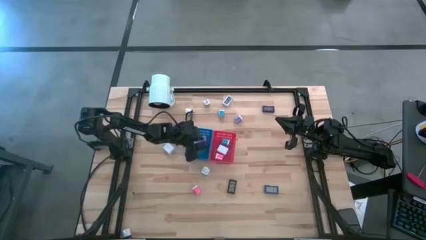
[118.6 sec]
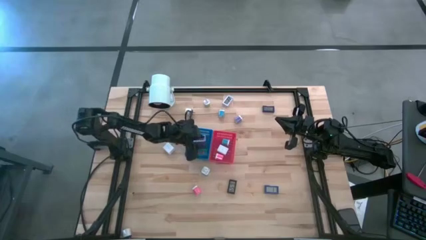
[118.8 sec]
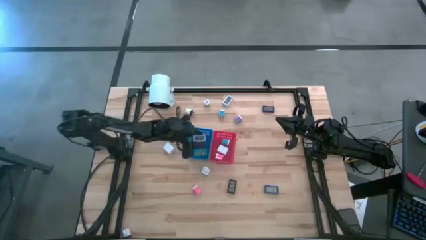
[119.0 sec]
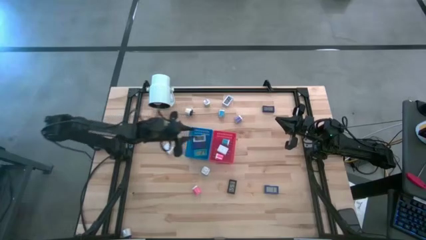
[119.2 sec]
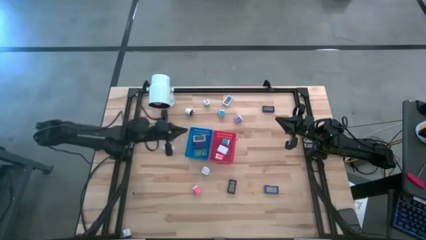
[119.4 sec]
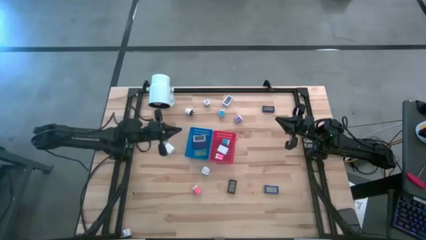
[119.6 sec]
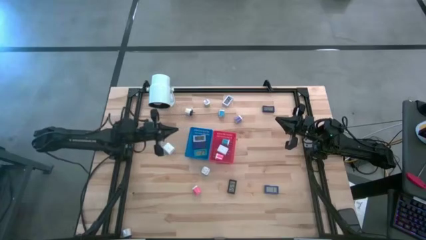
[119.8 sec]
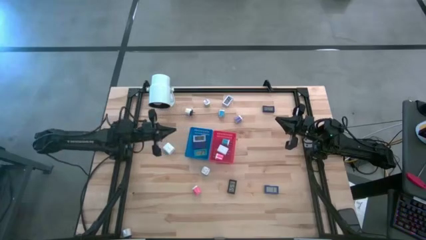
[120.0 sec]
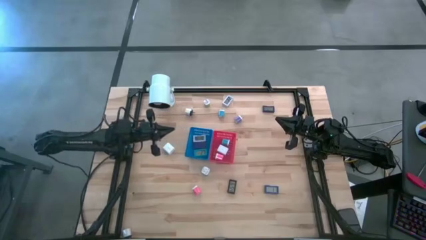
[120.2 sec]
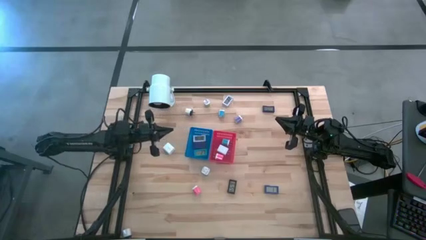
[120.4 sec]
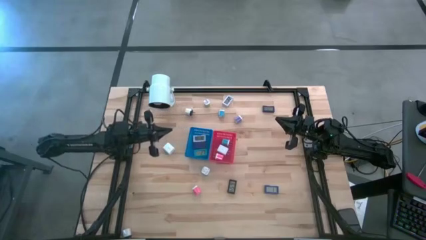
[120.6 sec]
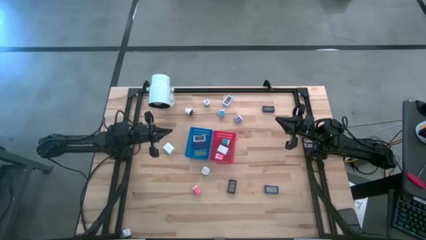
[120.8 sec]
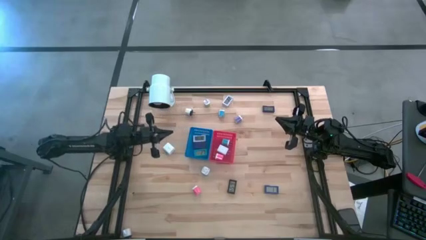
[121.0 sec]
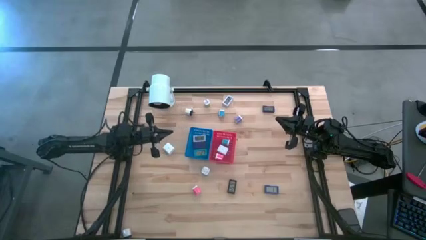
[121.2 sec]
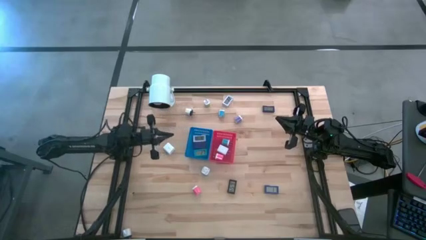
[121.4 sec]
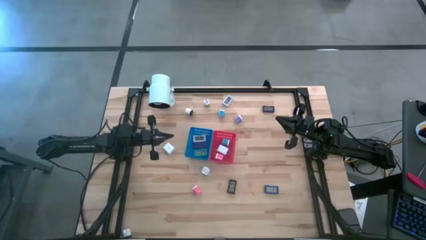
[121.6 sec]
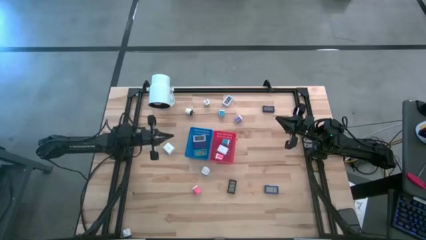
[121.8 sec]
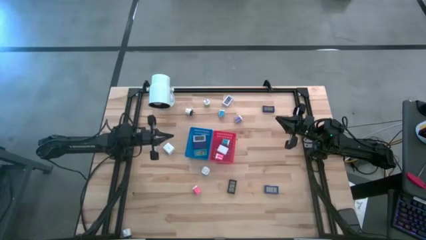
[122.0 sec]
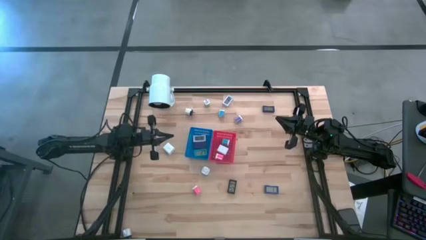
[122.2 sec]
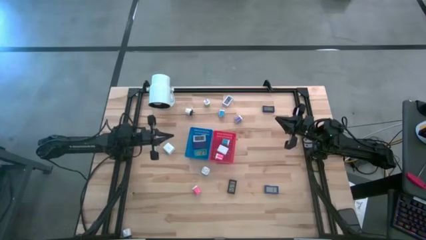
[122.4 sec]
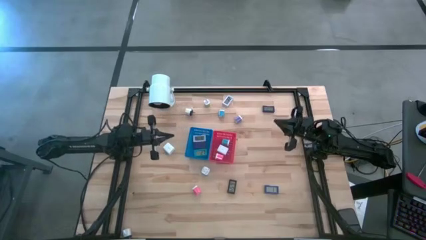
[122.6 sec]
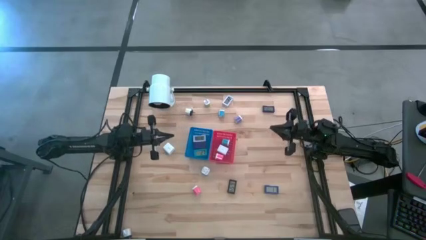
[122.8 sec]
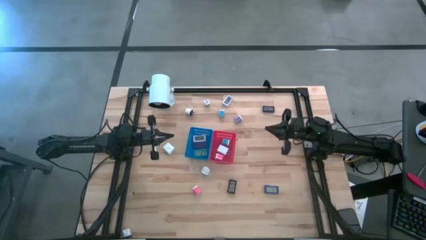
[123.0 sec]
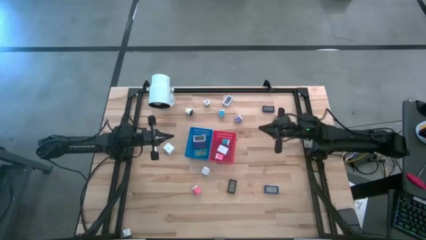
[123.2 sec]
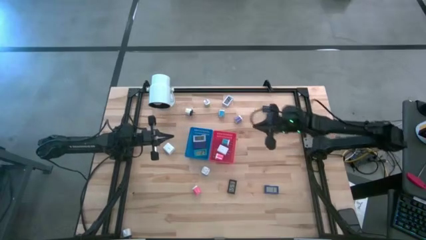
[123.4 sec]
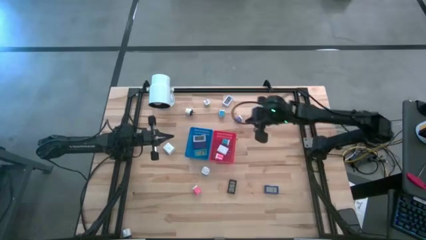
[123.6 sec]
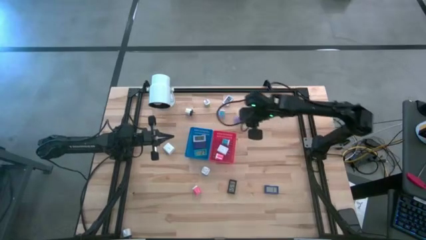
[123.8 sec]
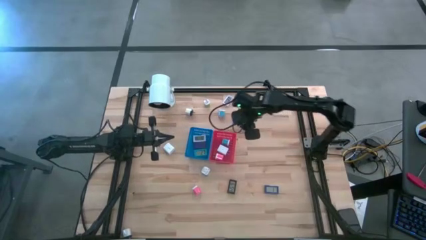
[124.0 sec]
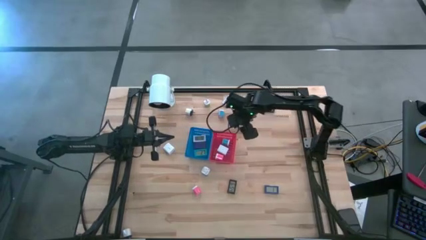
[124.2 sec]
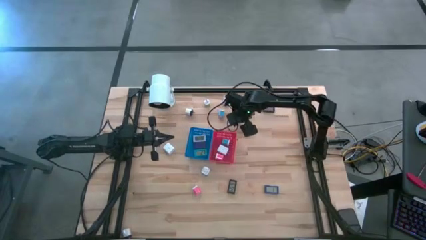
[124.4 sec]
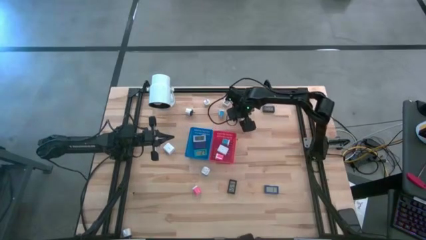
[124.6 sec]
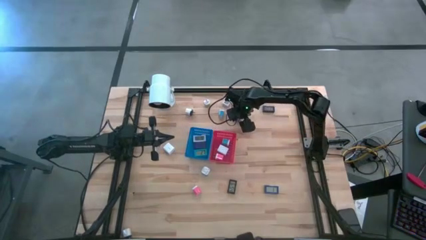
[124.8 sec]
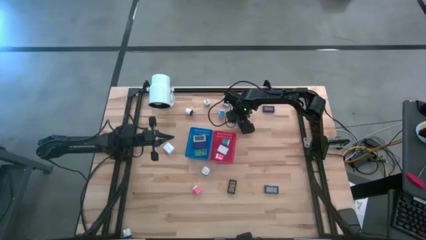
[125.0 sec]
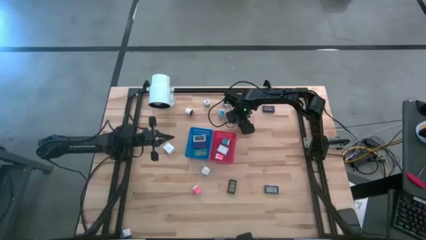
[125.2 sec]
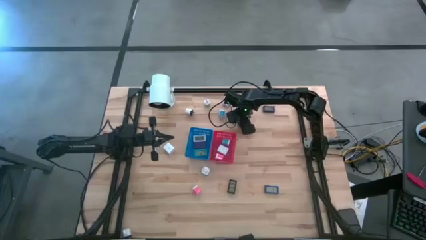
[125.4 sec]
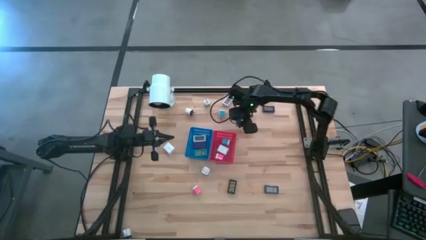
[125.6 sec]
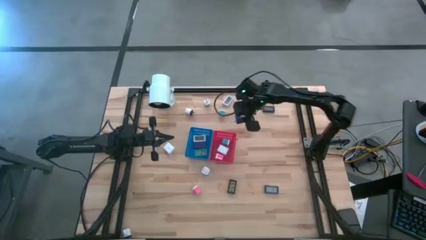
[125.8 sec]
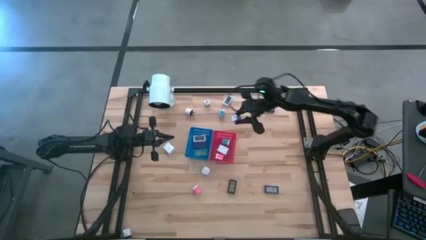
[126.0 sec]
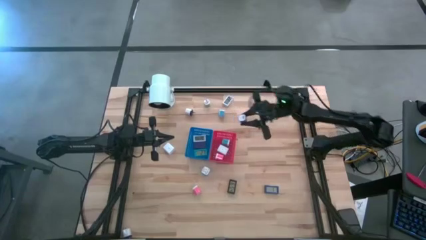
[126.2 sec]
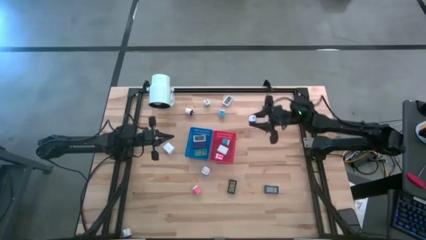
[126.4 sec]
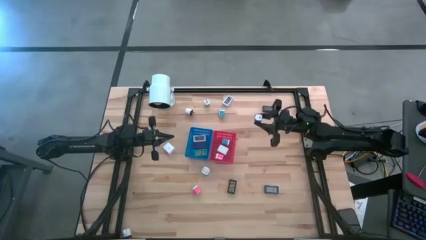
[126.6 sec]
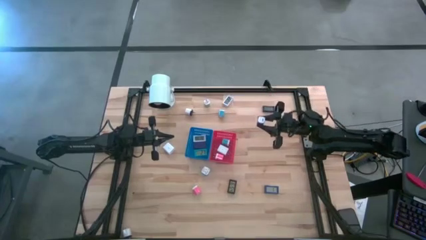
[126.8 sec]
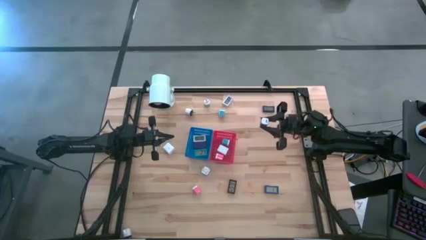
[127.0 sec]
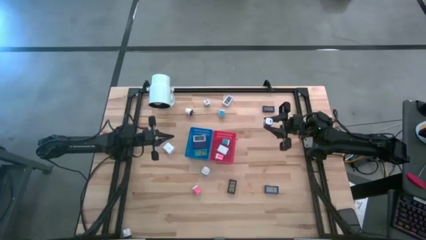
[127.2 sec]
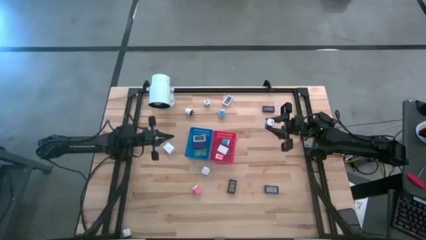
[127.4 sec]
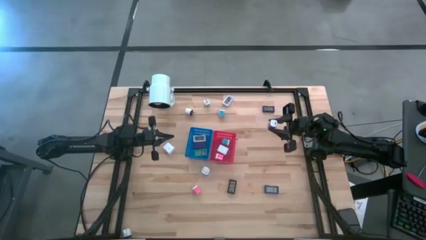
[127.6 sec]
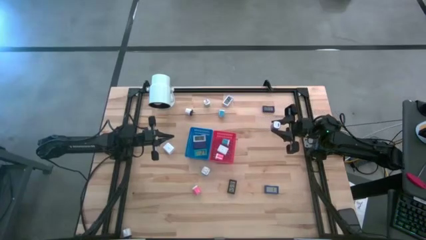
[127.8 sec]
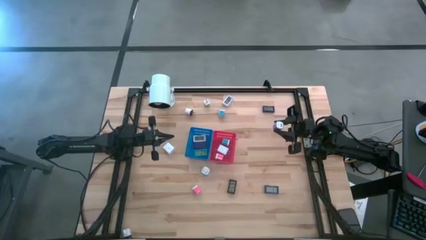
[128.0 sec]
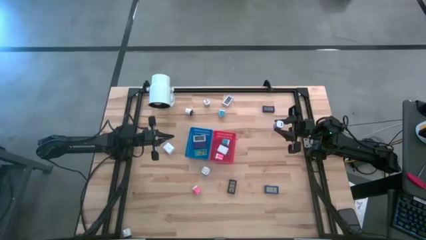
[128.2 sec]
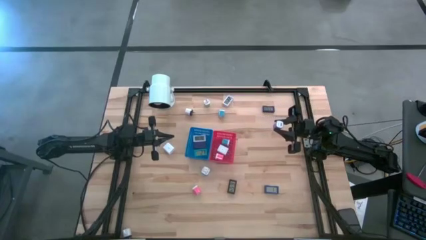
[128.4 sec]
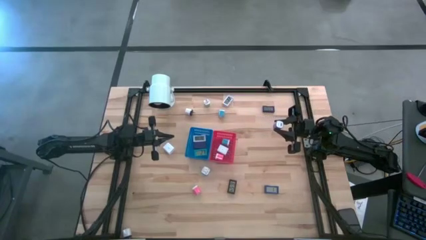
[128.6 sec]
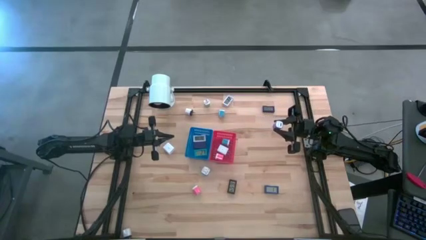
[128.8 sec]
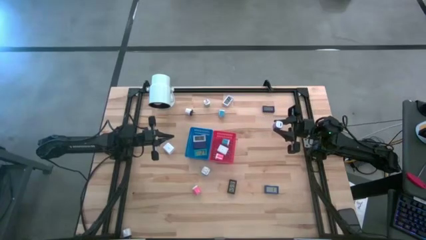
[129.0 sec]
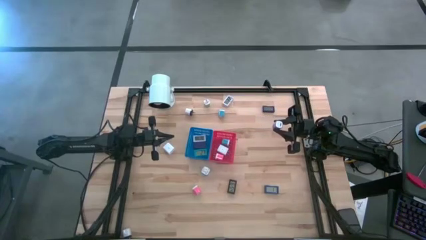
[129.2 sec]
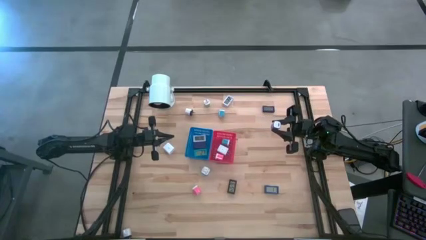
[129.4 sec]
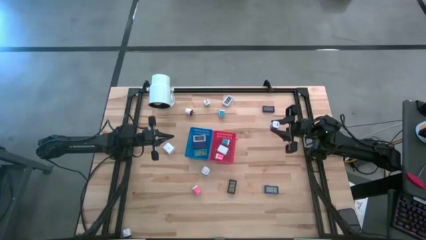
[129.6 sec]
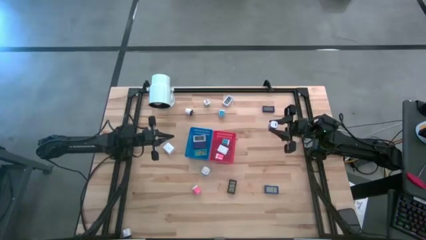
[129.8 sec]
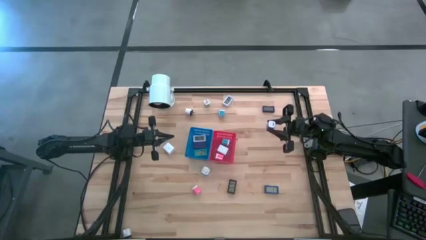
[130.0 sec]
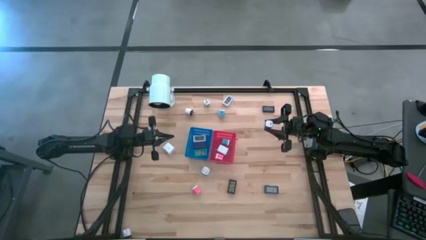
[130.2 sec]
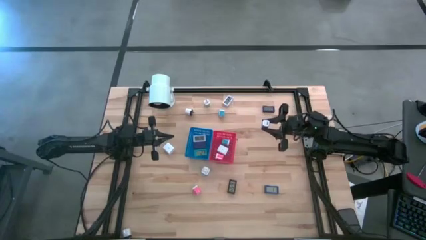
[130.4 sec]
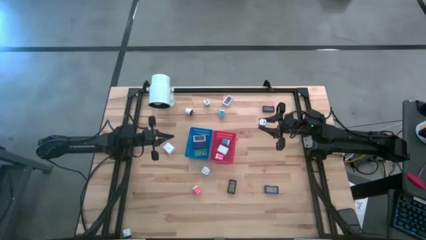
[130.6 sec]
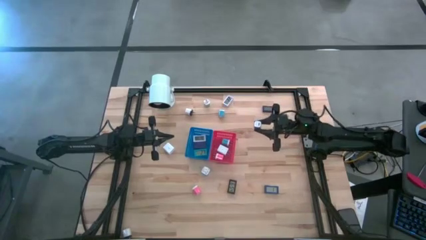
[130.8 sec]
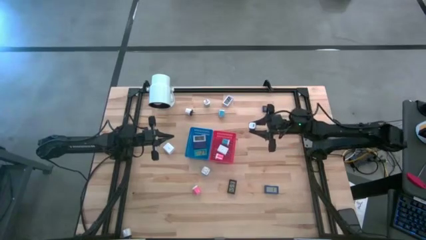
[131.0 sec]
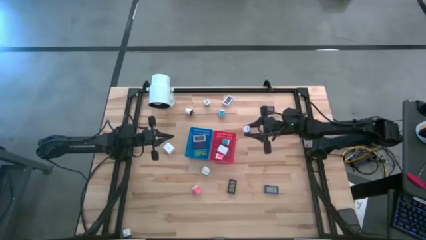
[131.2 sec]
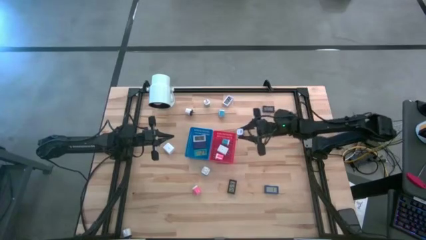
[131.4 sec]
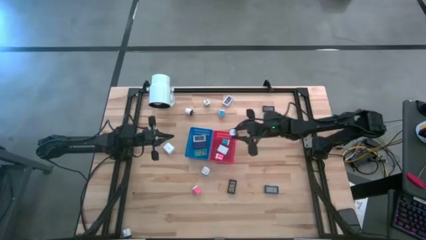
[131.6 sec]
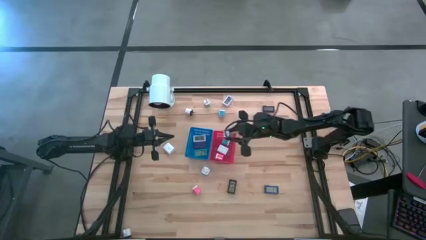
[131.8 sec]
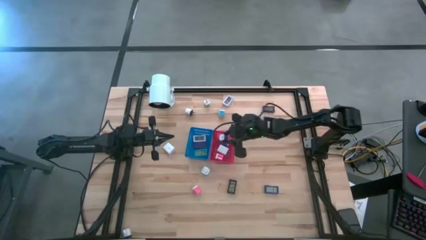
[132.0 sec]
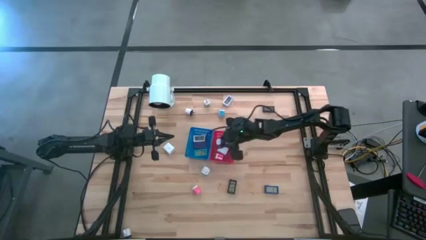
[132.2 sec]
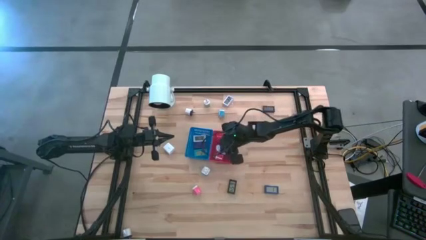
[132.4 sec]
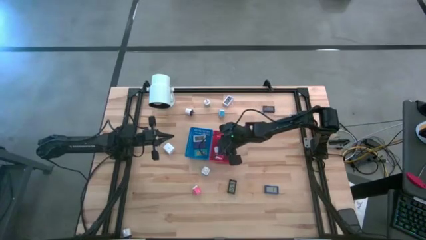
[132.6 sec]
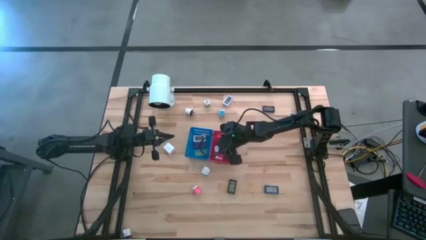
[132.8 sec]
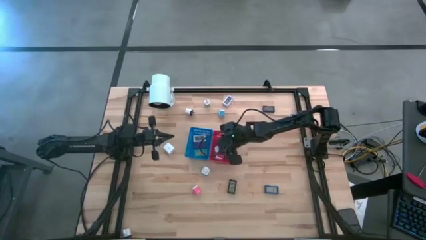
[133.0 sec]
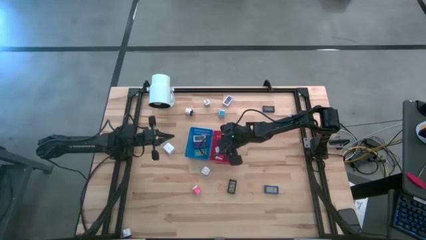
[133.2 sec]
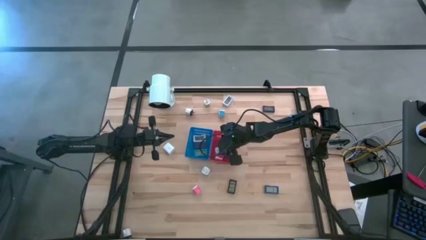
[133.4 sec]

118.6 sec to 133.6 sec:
Task: Pick & Place Office items
Put the violet charger adapter into the red bin

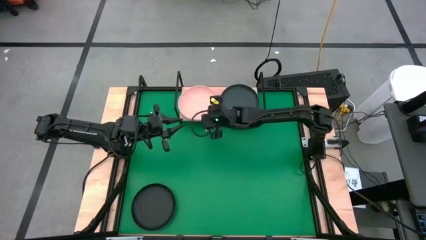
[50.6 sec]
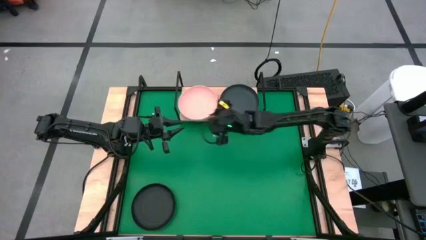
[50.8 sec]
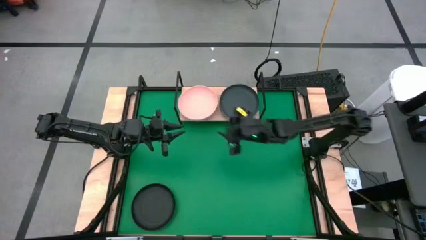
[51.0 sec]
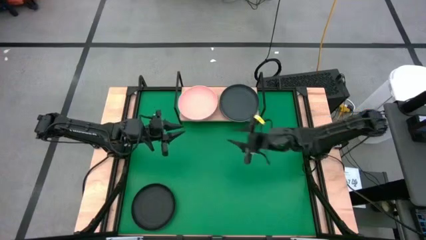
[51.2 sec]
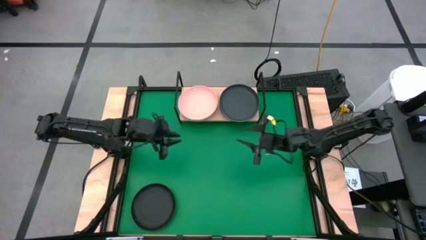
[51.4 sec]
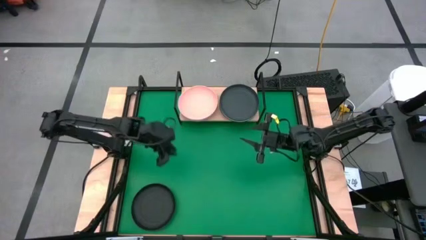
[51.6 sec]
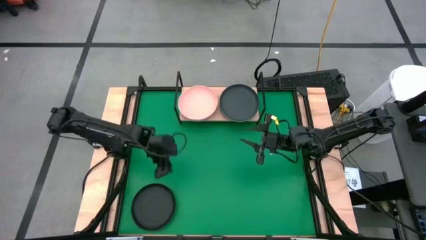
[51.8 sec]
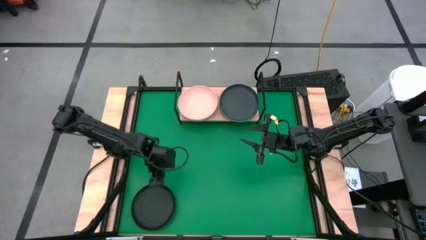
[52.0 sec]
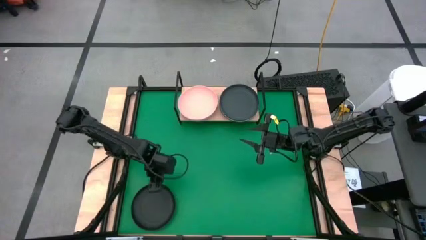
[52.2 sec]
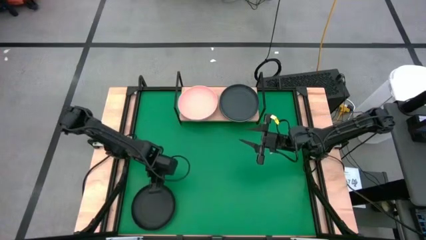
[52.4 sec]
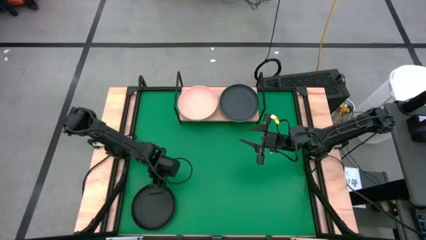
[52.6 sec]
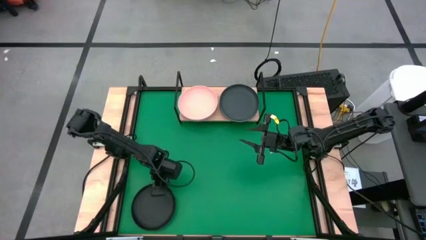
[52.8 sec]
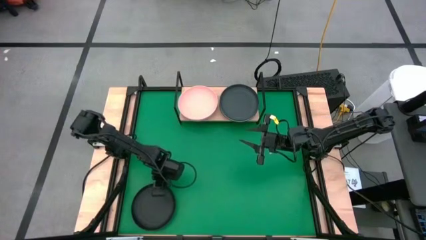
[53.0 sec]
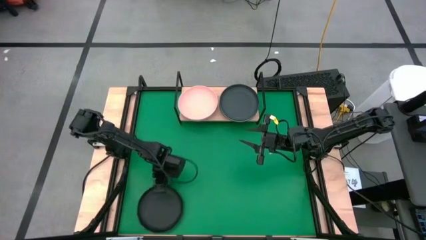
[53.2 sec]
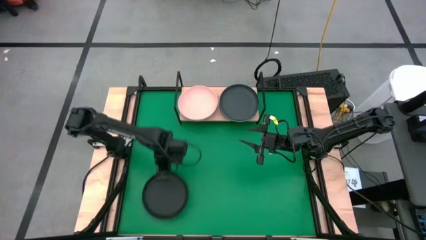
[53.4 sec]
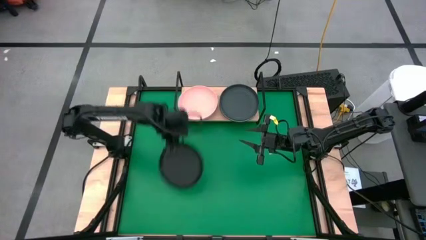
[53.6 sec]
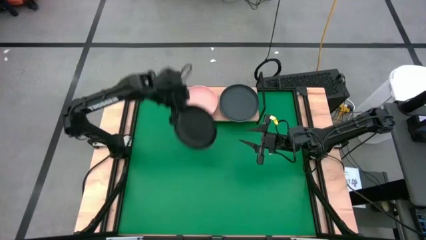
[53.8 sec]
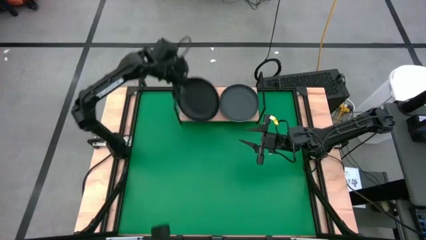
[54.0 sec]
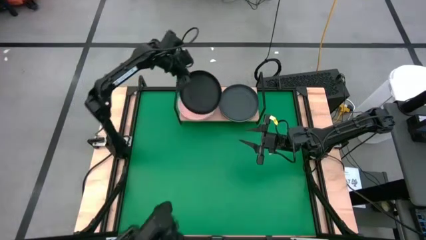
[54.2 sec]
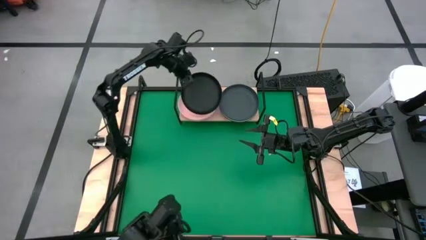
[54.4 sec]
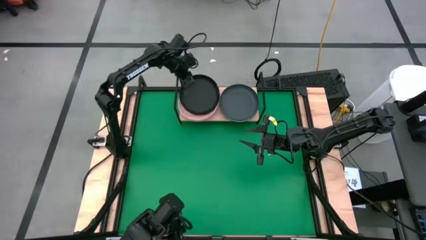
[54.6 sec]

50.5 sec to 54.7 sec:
Task: Place and stack plates onto a shelf
Stack the black plate on top of the light pink plate on the shelf
